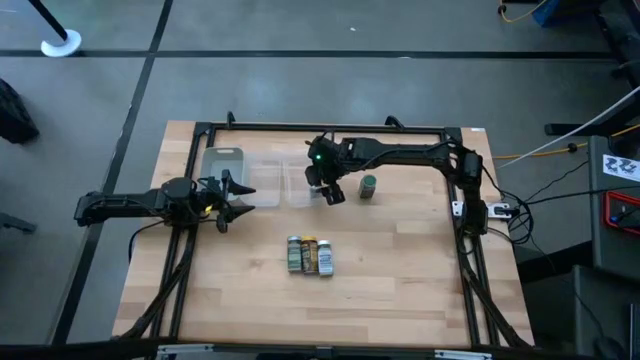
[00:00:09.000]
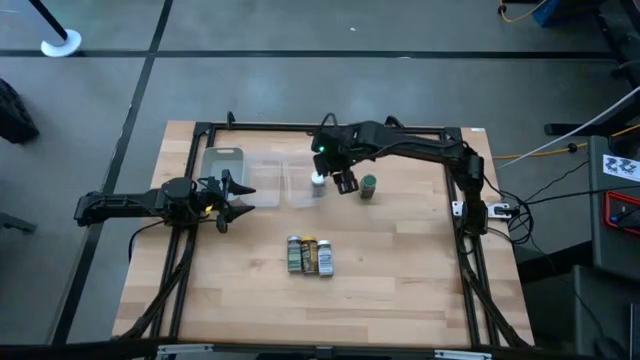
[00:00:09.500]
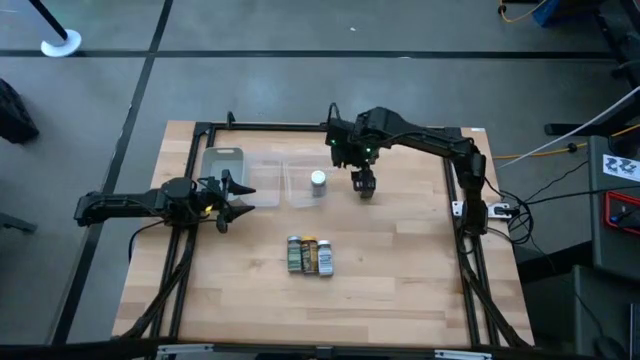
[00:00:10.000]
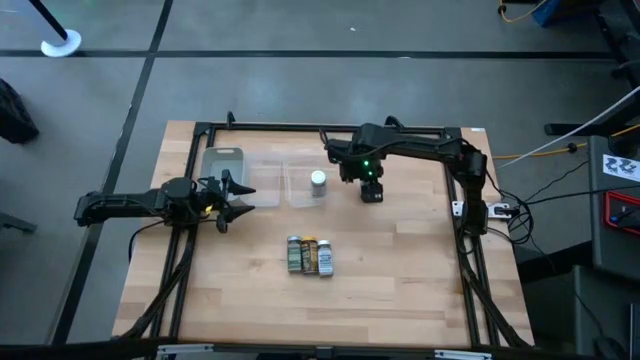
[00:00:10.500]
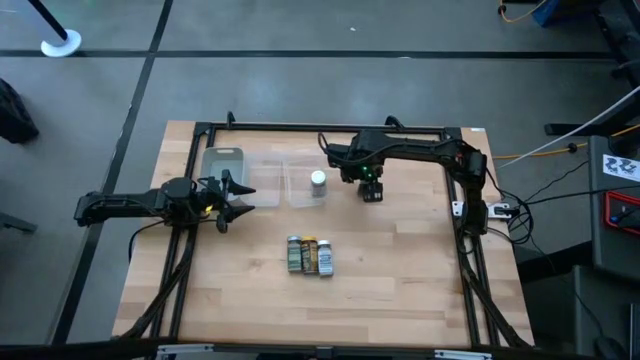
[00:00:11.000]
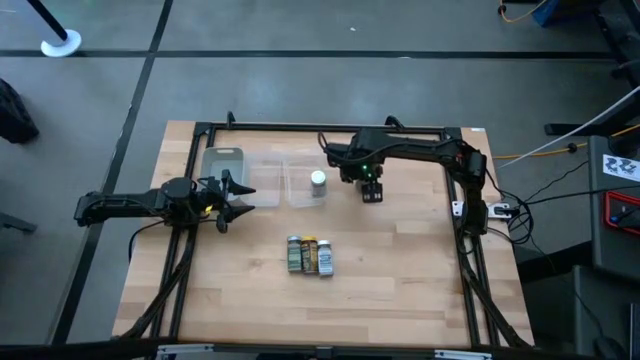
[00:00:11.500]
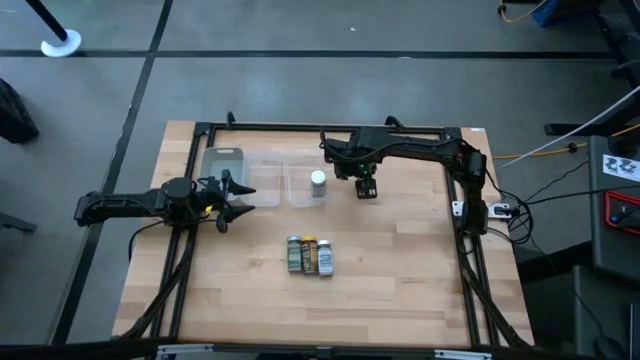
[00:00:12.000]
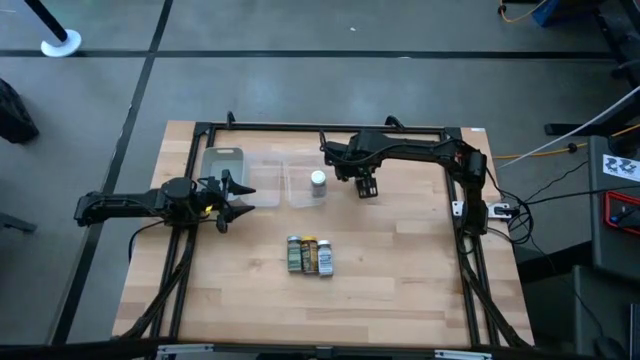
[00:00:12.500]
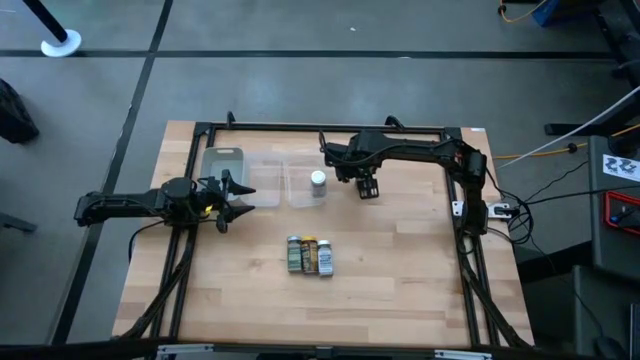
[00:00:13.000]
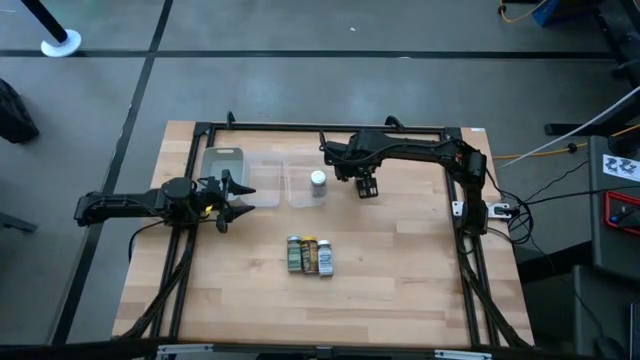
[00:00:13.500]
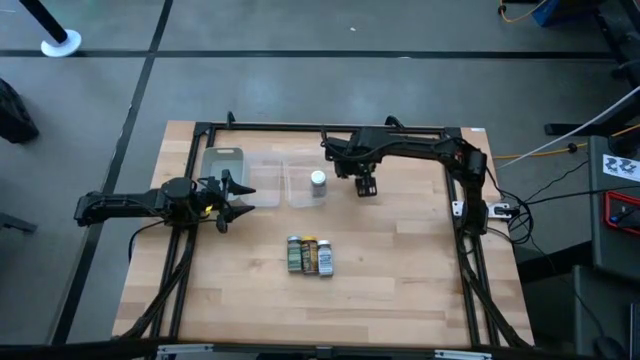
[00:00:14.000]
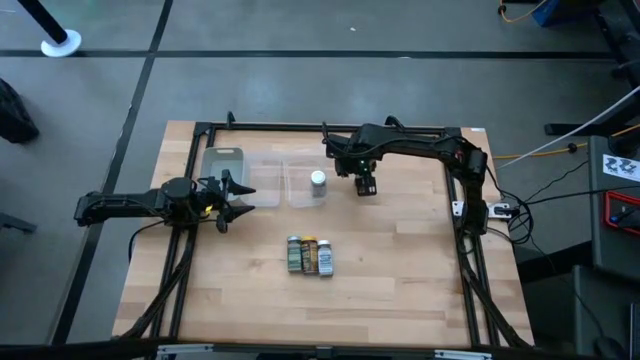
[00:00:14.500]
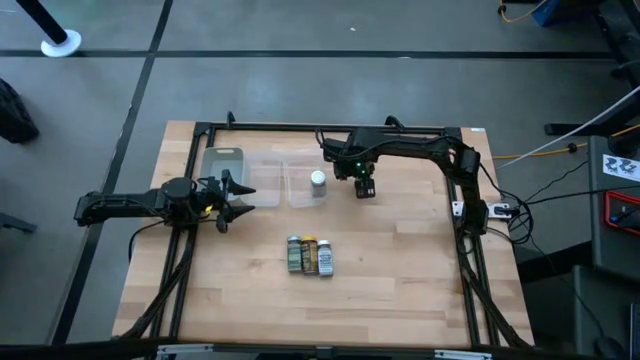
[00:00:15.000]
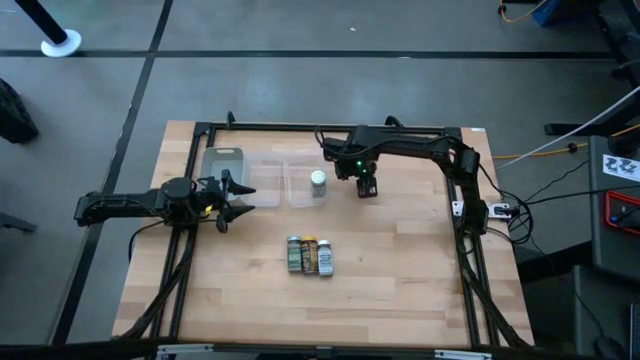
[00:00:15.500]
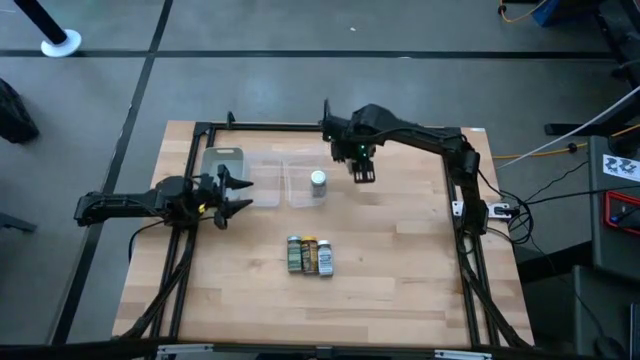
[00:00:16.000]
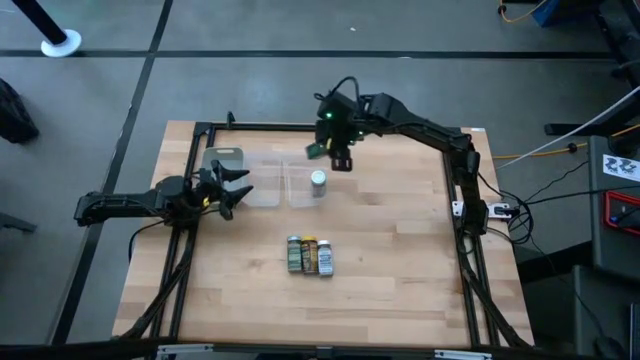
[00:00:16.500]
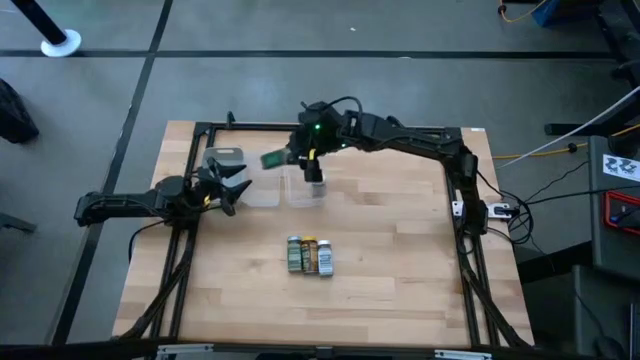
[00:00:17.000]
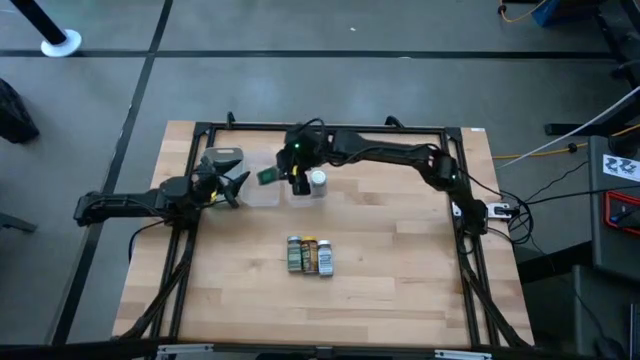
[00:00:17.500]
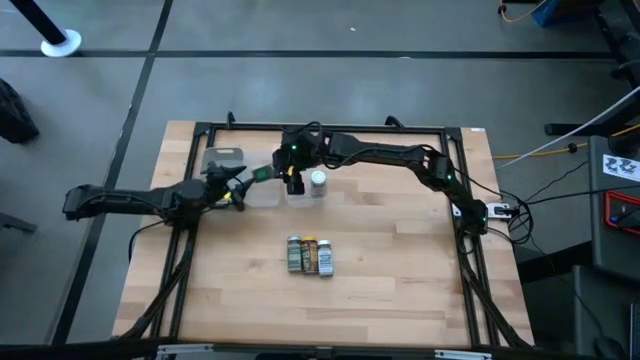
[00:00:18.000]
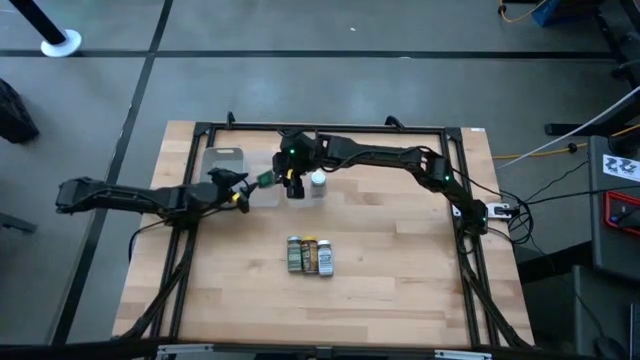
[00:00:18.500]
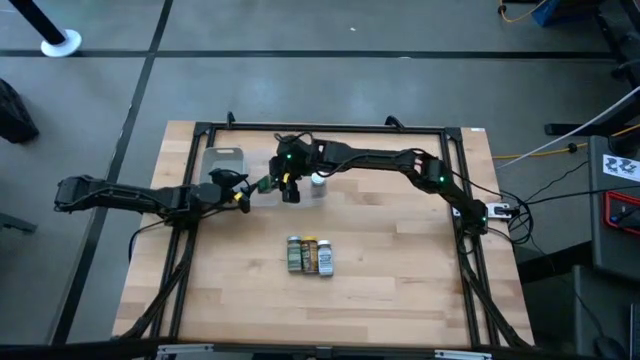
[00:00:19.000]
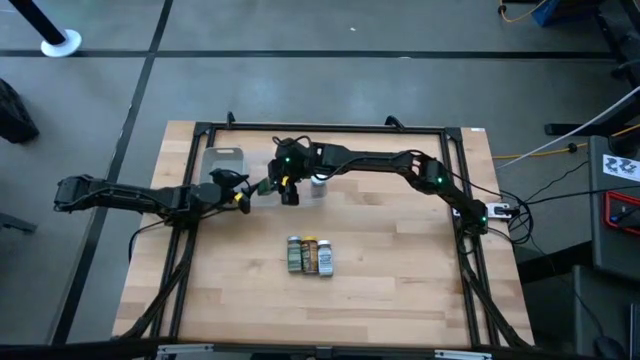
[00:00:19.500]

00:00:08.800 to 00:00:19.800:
Task: Sort spices by type
Put the top green seasoning bottle into the left transparent bin

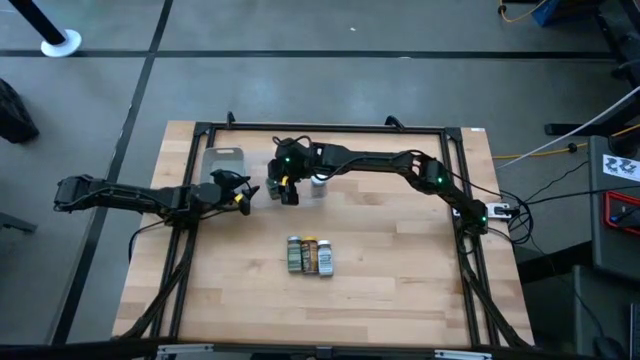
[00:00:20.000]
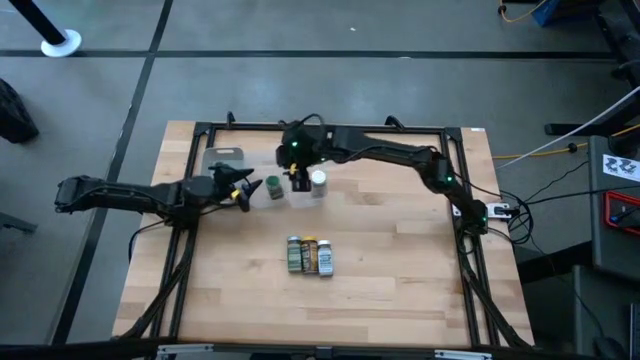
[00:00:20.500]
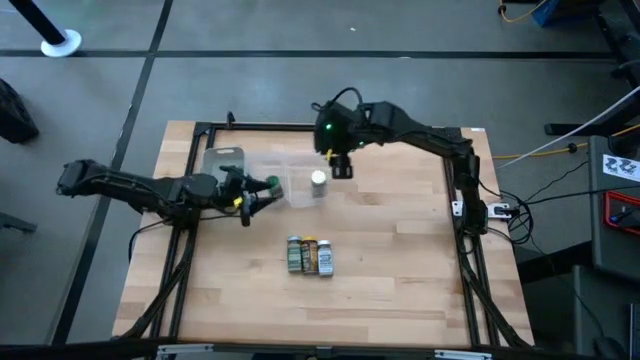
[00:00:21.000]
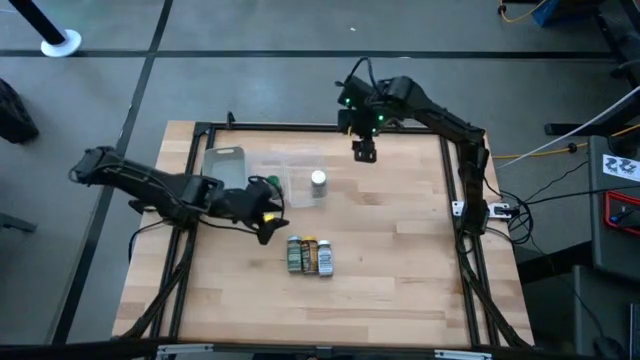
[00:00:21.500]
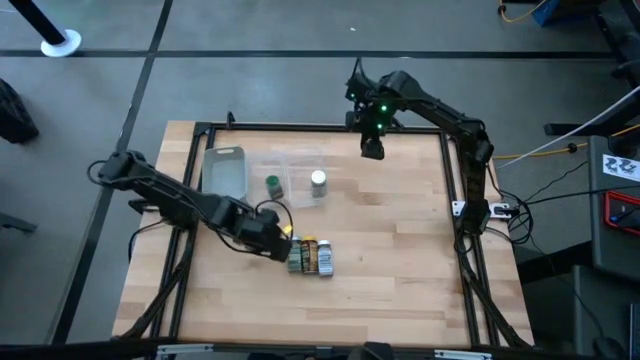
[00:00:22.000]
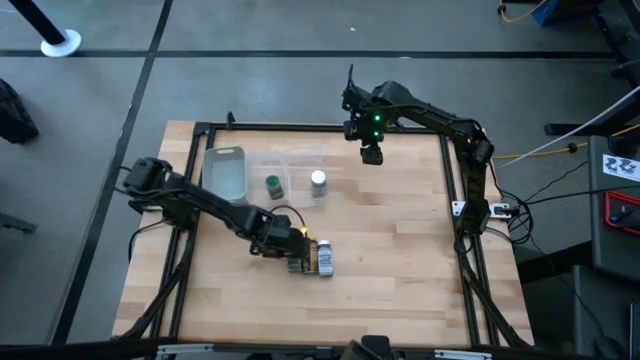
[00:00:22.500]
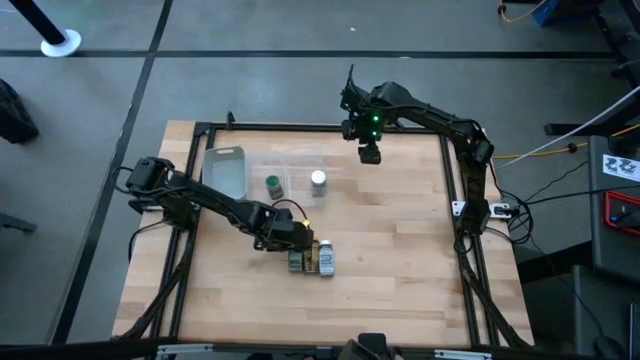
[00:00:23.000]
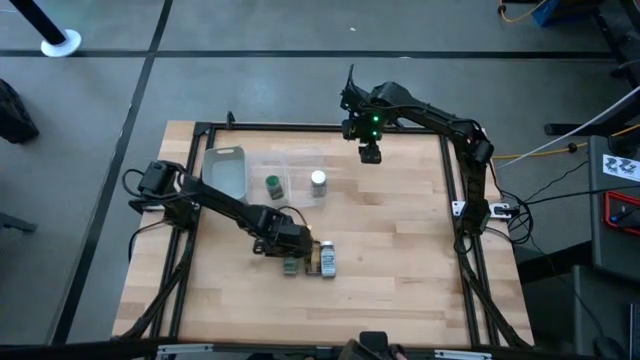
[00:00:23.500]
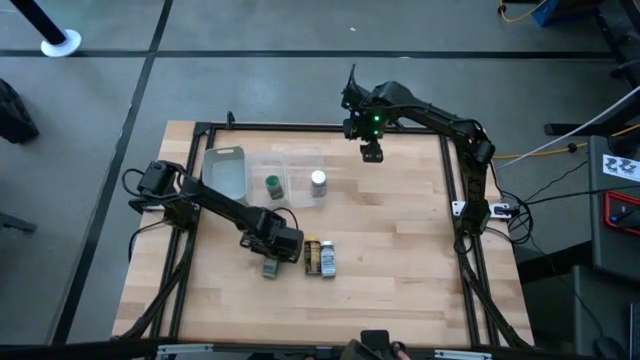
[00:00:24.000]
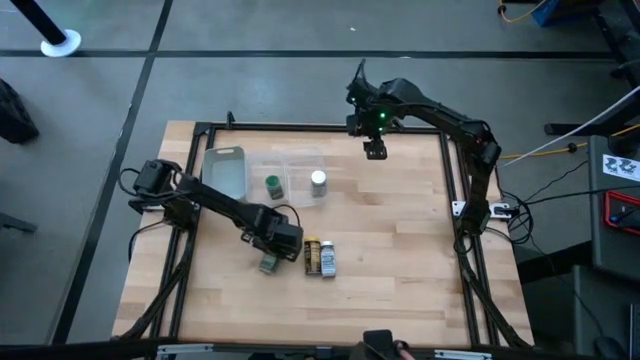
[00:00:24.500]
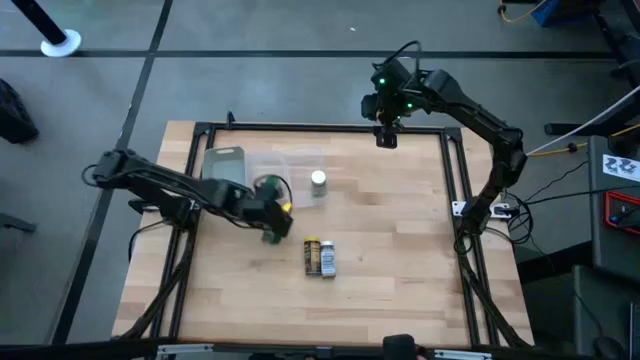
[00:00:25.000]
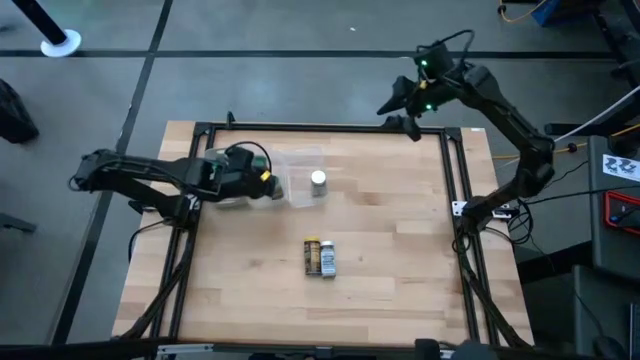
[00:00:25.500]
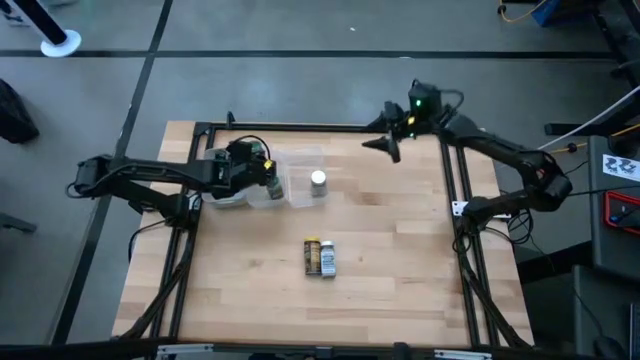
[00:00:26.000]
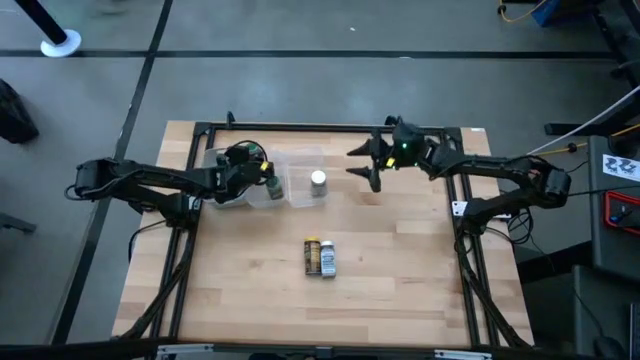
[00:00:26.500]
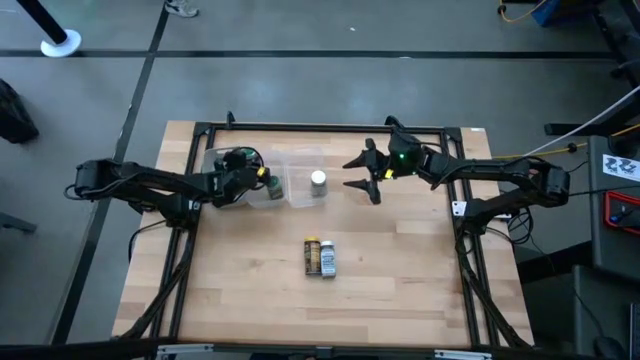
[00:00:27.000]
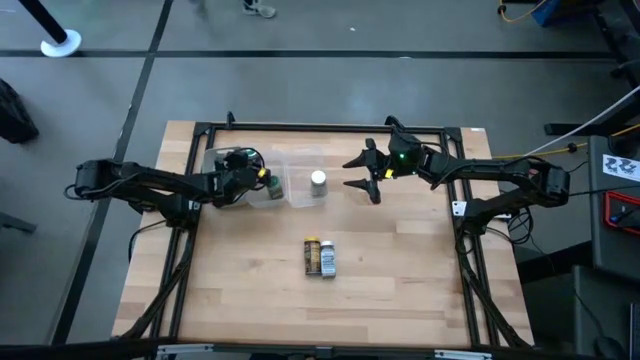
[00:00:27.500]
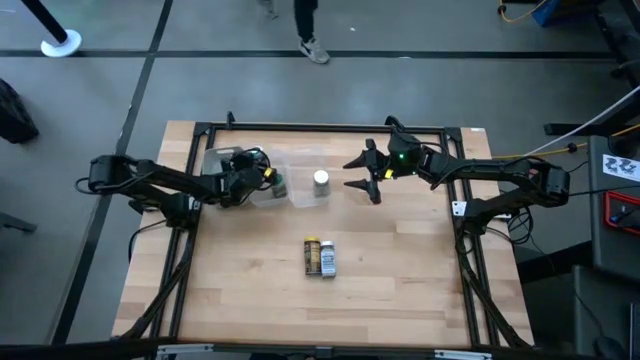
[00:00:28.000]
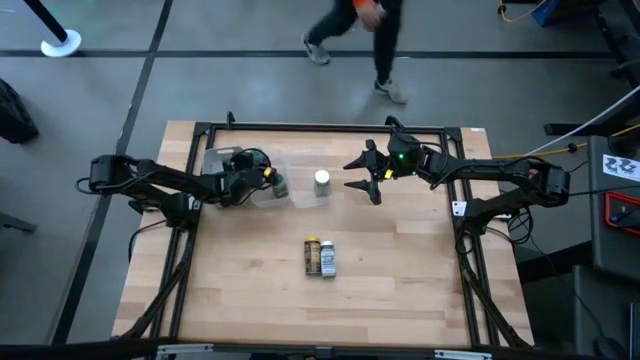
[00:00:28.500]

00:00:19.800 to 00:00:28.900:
Put the green seasoning bottle into the left transparent bin
